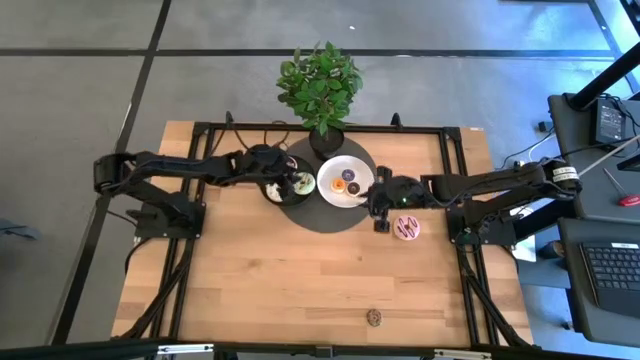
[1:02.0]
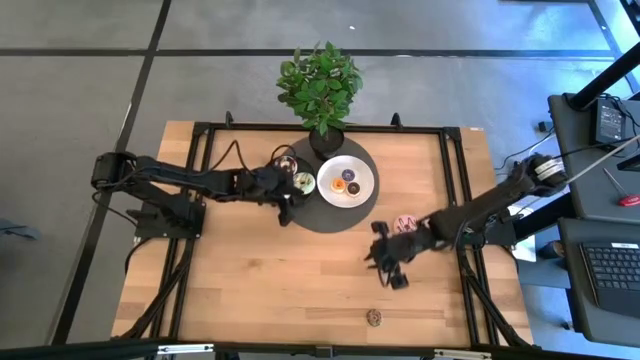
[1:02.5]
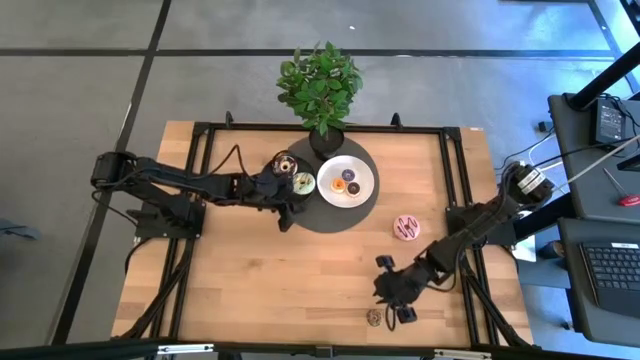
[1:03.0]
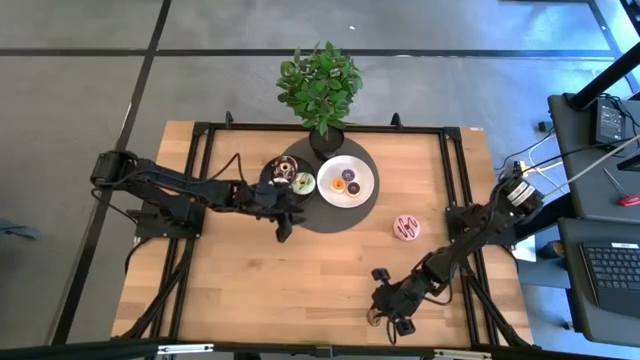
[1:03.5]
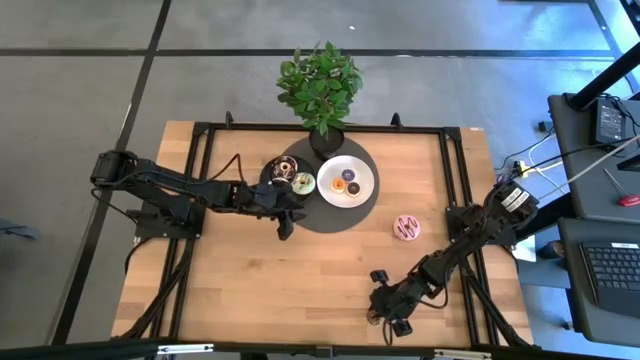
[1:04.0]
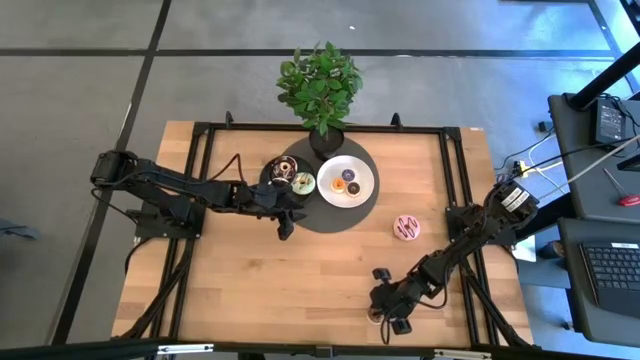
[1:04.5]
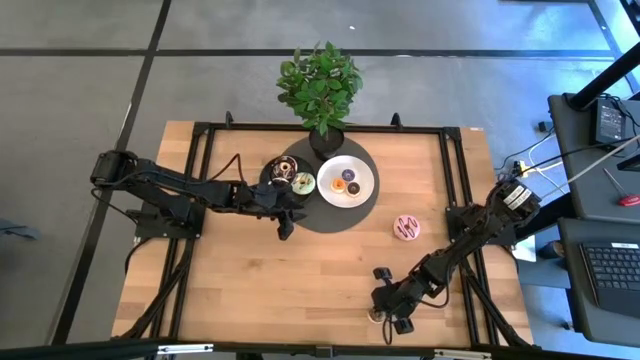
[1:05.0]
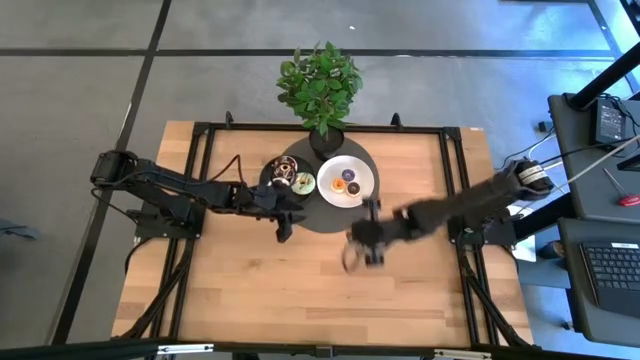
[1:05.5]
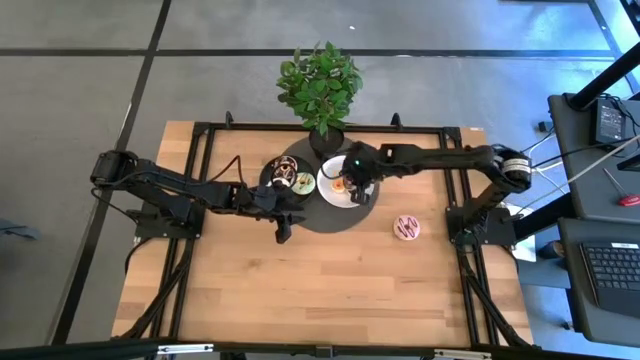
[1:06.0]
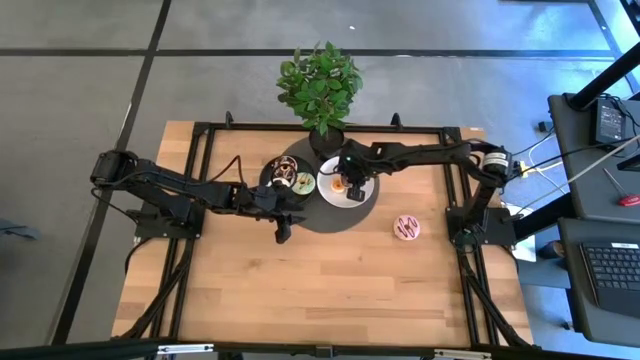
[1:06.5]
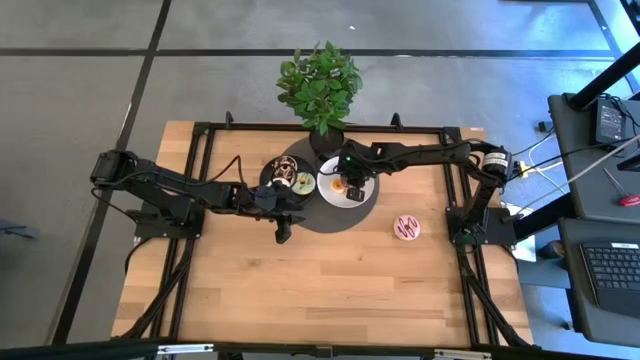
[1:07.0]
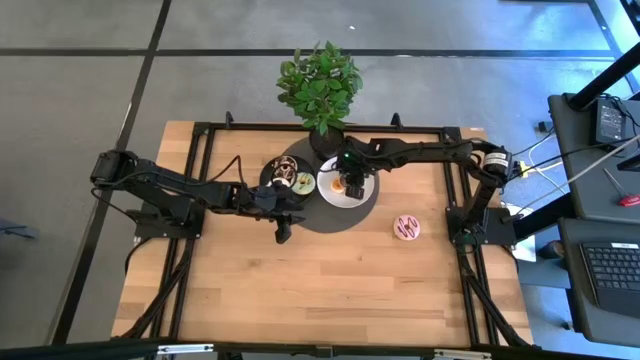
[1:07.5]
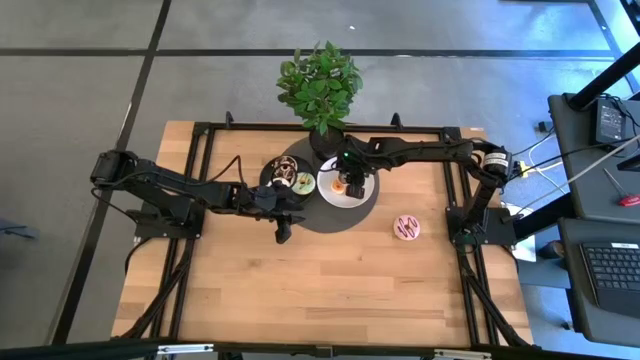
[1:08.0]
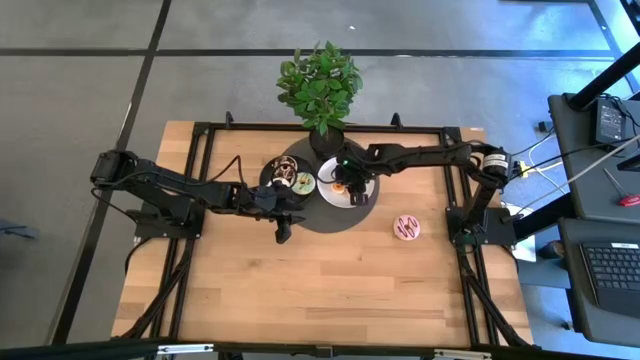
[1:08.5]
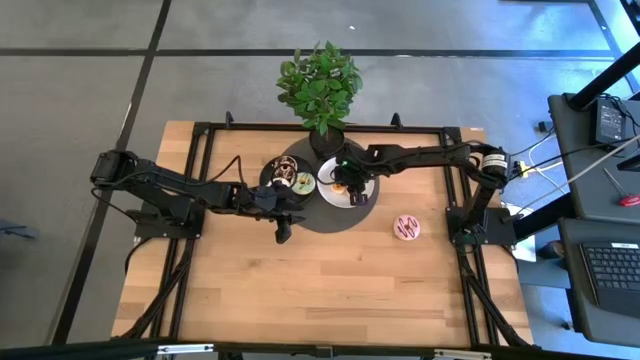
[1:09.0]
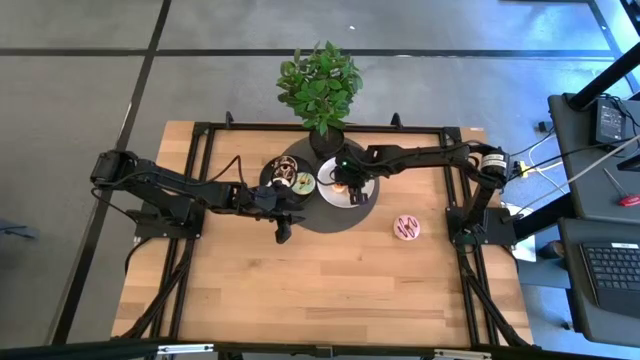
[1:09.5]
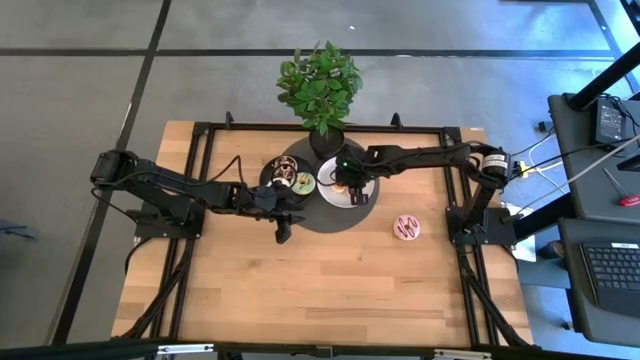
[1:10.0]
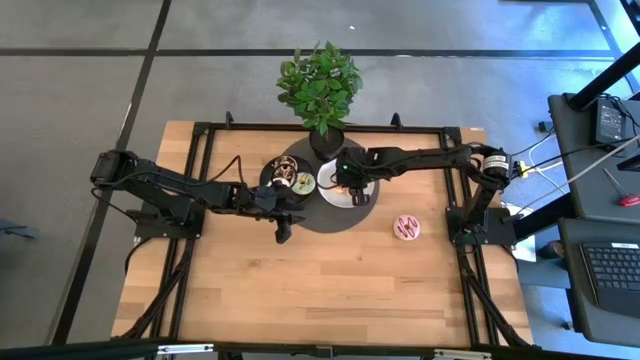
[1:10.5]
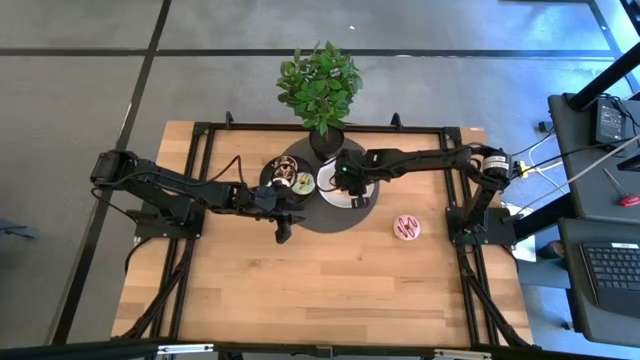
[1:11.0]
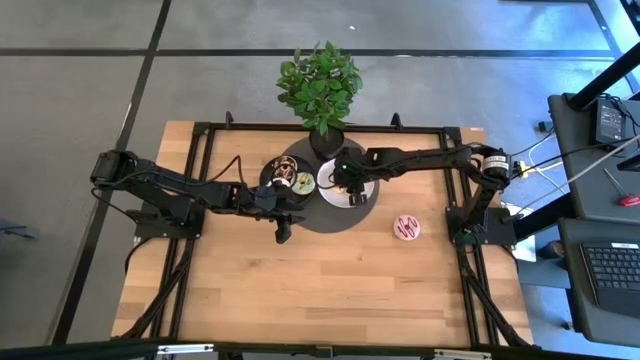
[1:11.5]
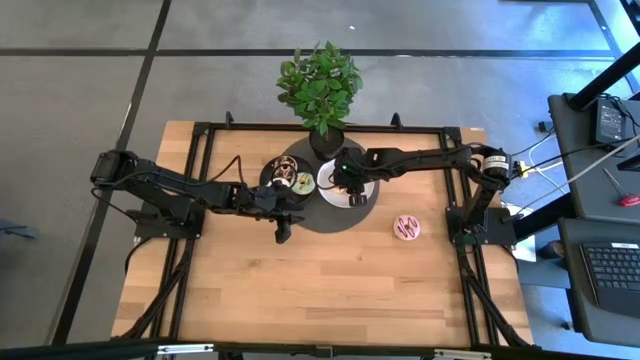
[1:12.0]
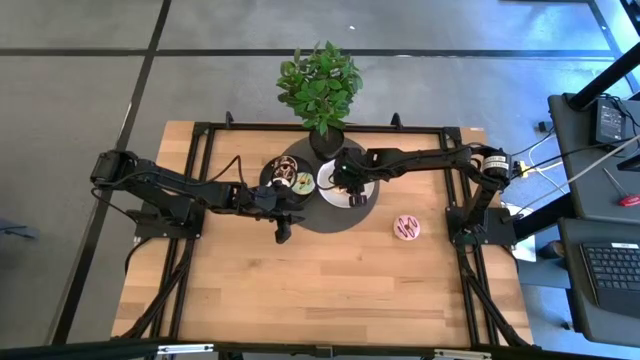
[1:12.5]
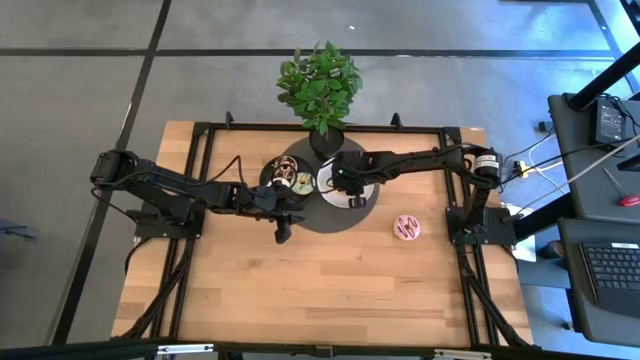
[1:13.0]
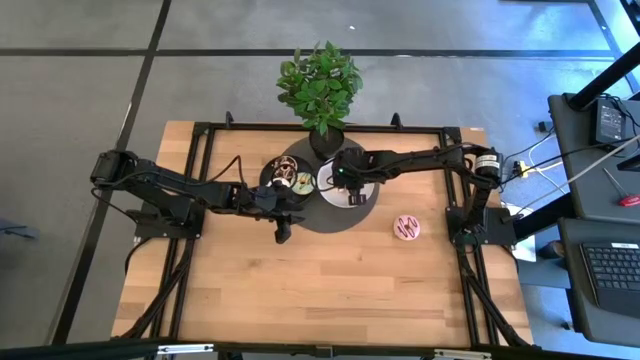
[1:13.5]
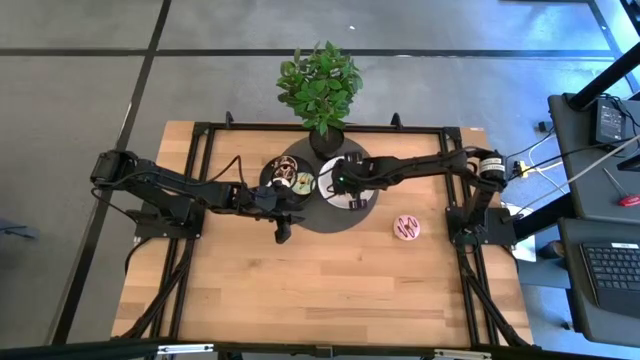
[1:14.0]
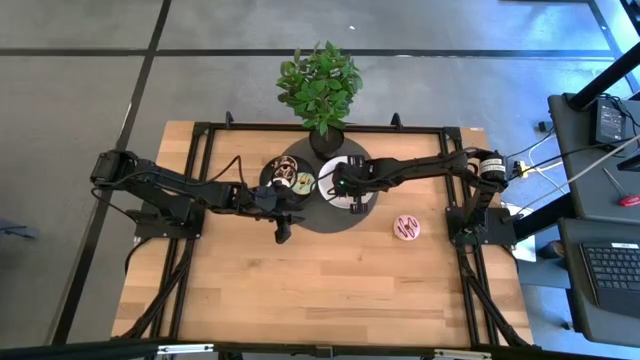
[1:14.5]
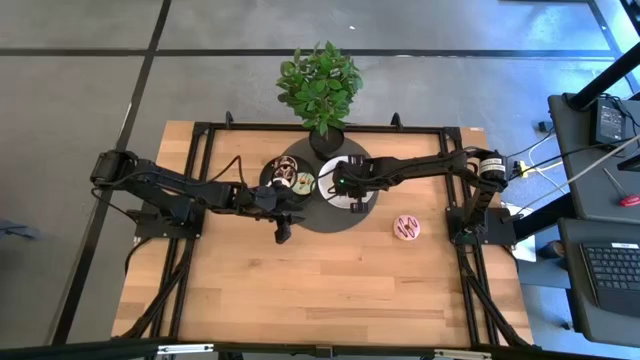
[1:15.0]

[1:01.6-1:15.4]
Task: Pick & Place donuts
Put the small brown donut on the white plate

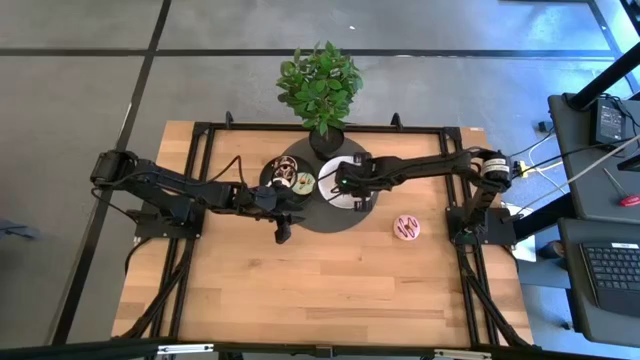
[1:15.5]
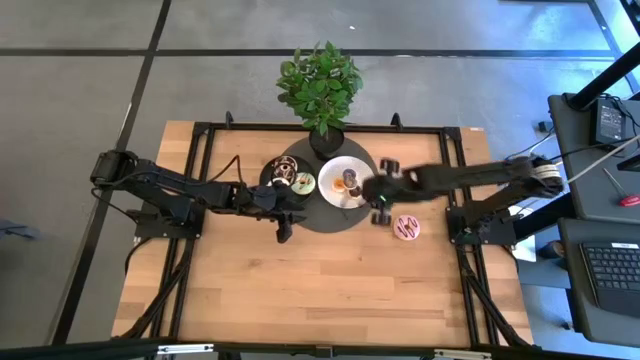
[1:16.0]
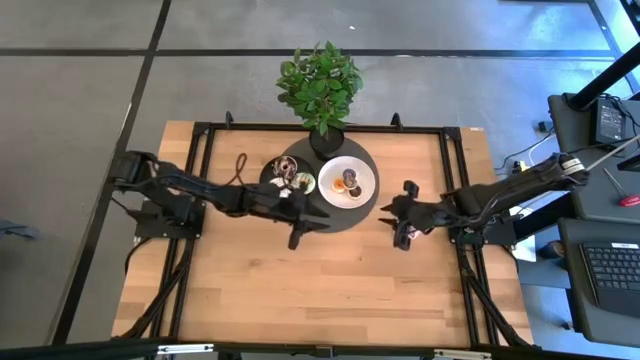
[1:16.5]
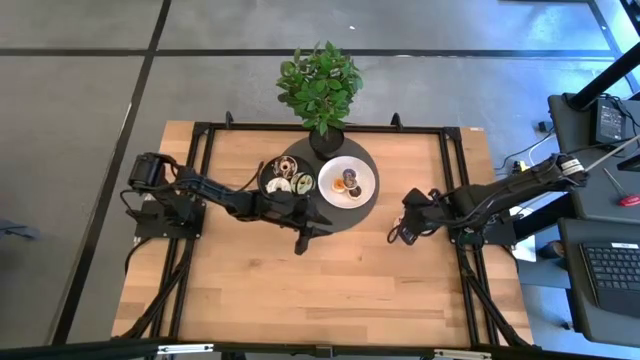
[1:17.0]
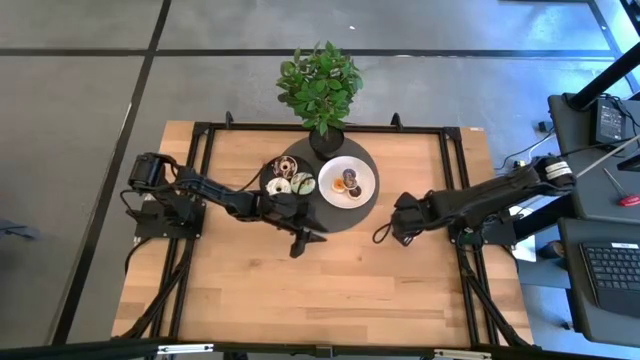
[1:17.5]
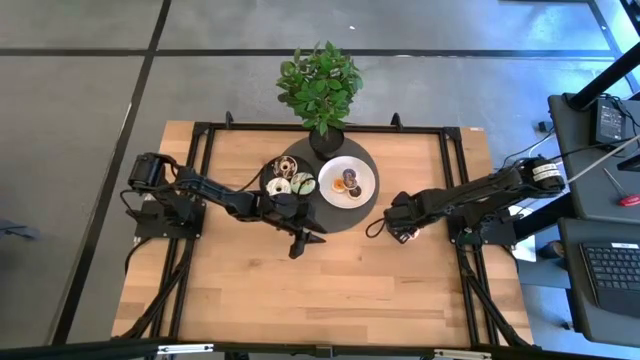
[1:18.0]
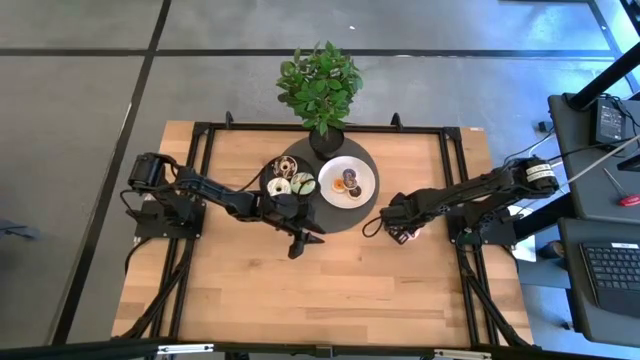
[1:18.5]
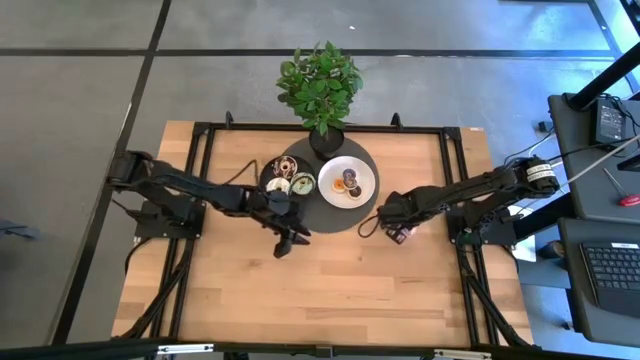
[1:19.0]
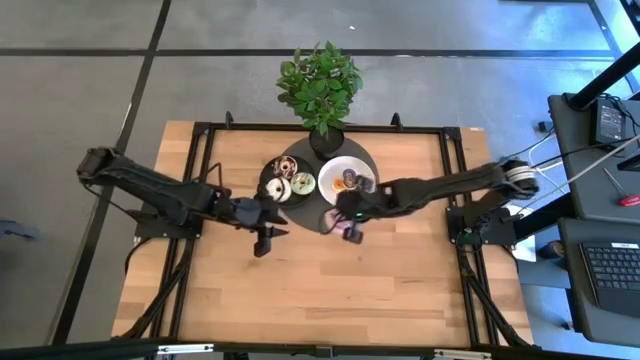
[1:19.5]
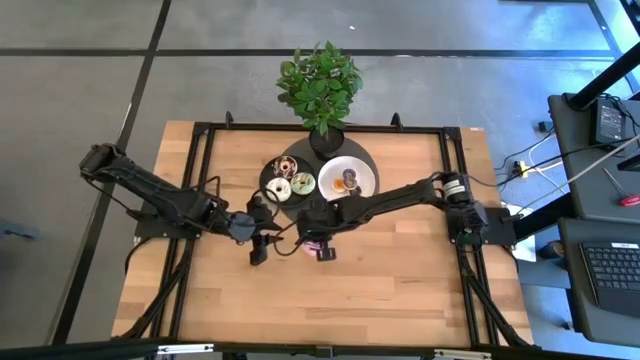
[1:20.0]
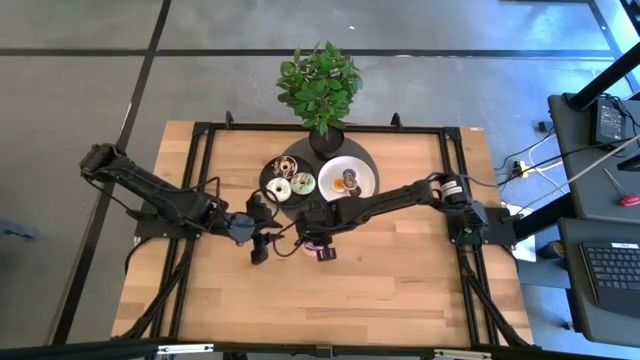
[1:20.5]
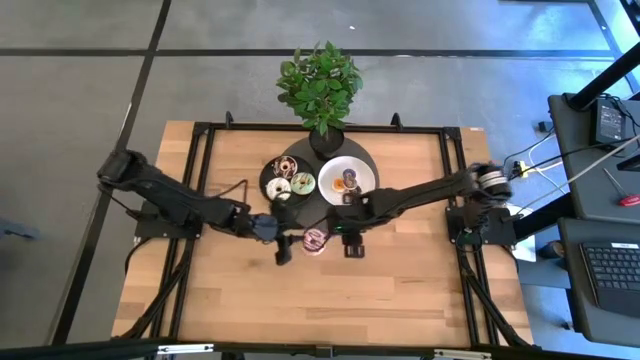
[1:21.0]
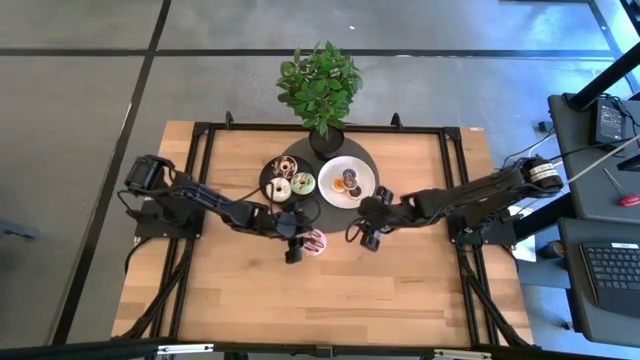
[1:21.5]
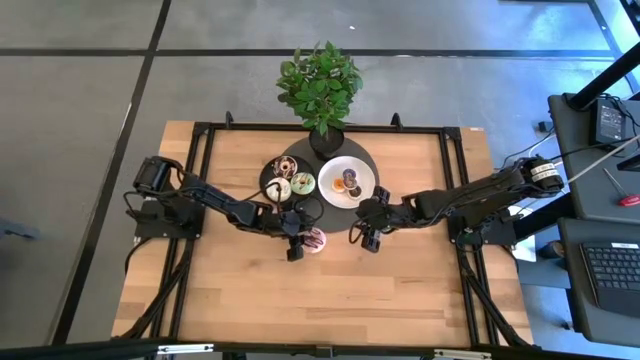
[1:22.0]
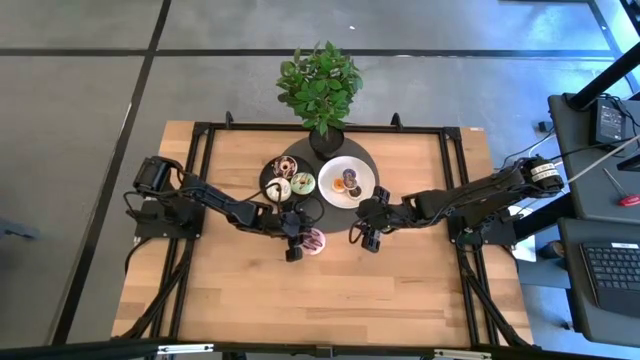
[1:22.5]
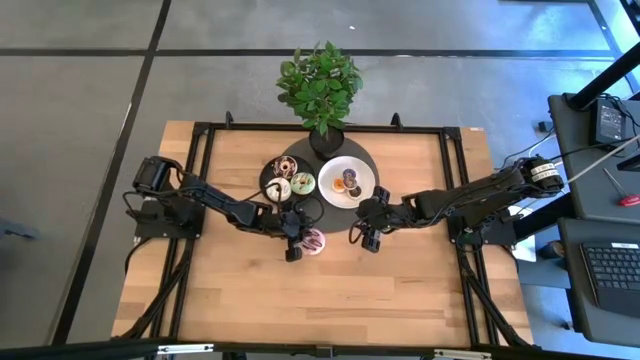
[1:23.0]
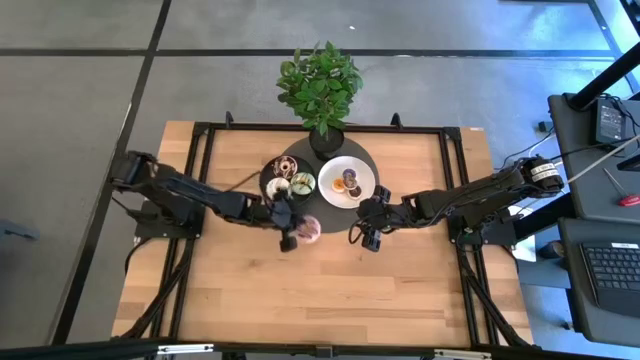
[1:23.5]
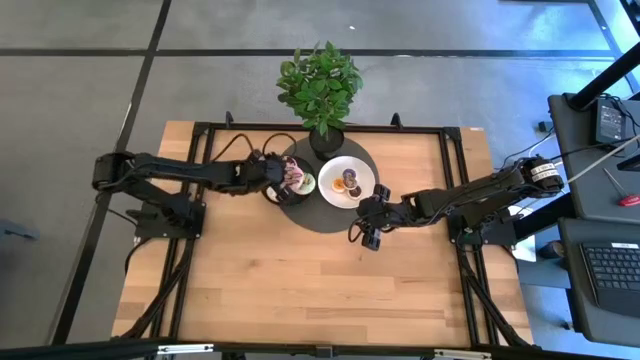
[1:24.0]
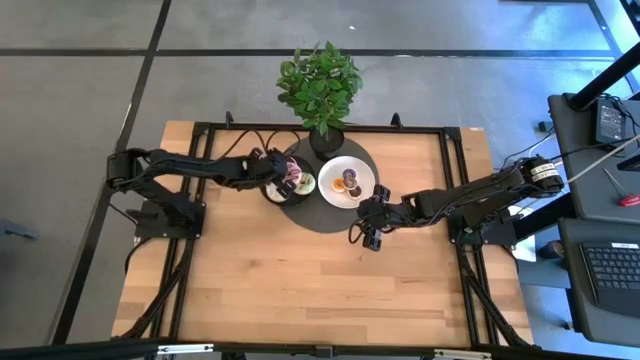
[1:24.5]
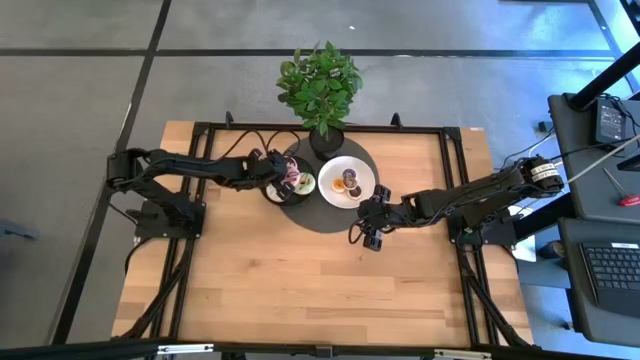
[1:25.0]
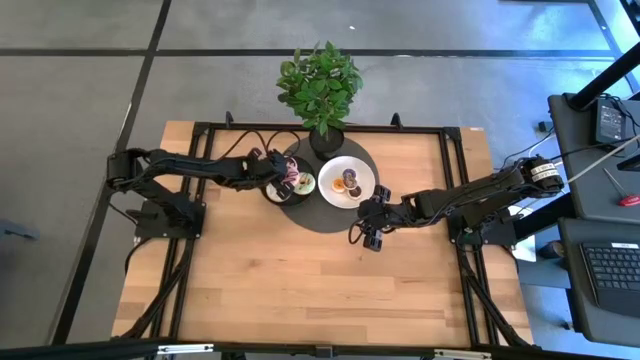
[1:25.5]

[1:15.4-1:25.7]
Put the big pink donut on the dark green plate
